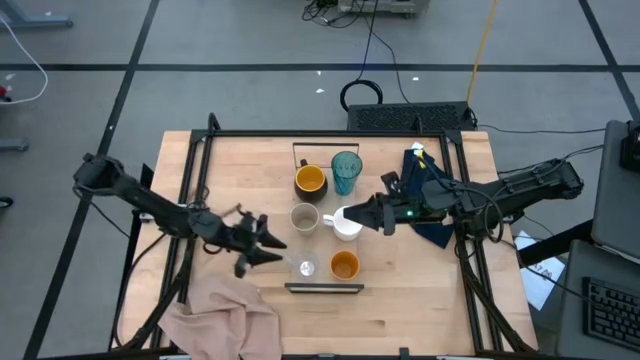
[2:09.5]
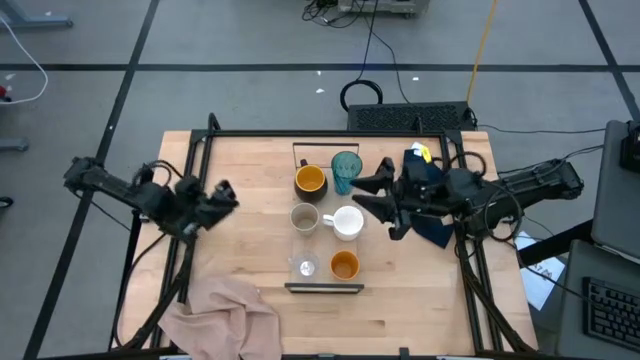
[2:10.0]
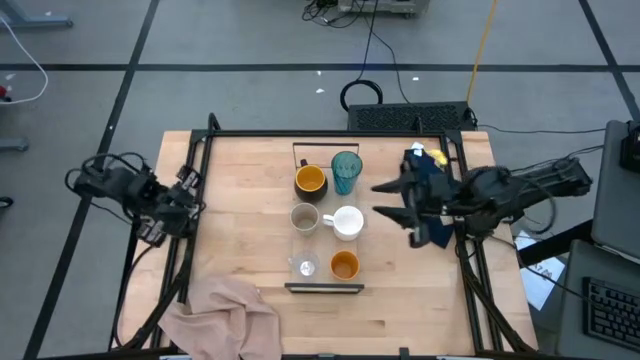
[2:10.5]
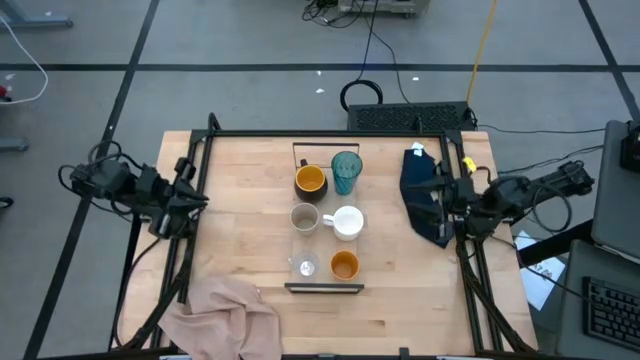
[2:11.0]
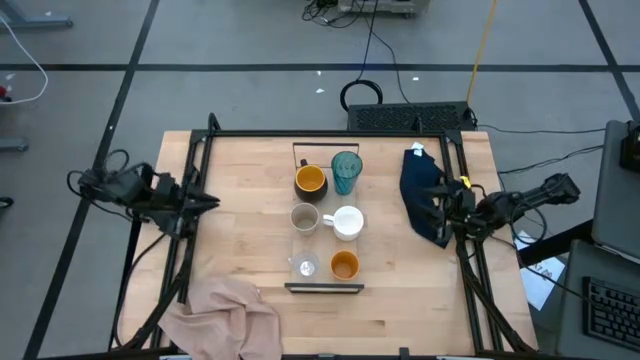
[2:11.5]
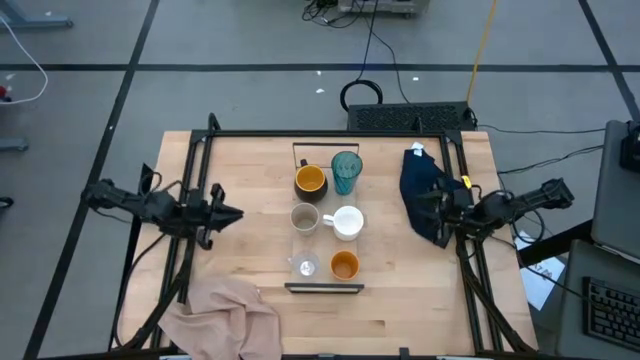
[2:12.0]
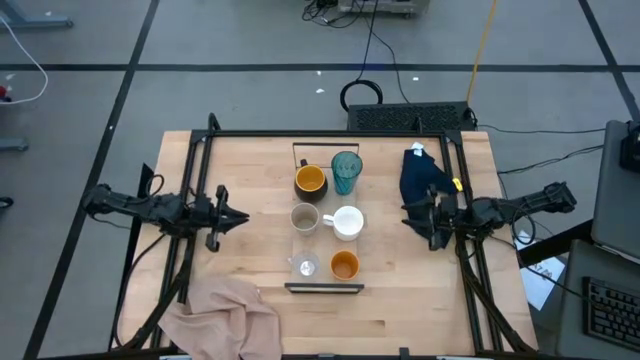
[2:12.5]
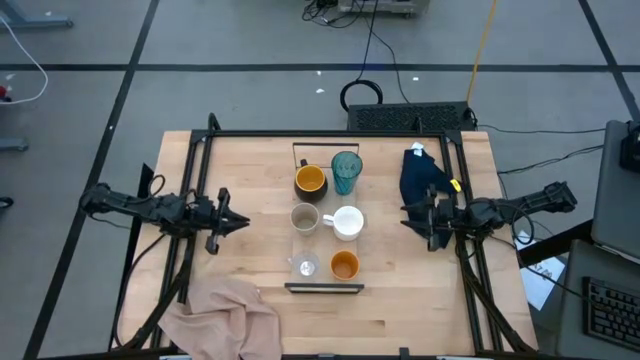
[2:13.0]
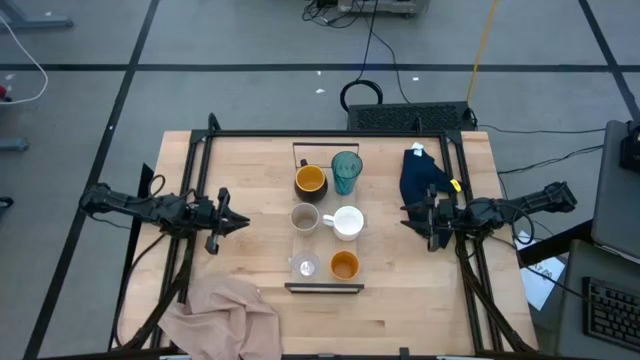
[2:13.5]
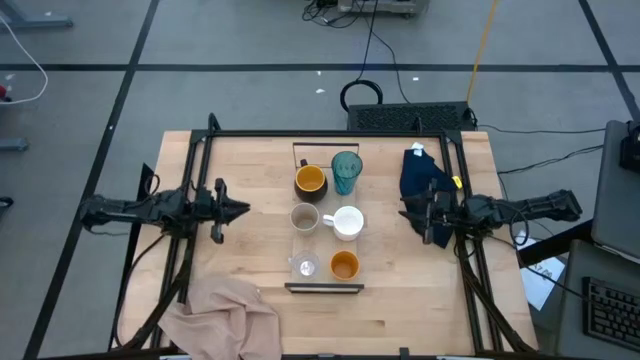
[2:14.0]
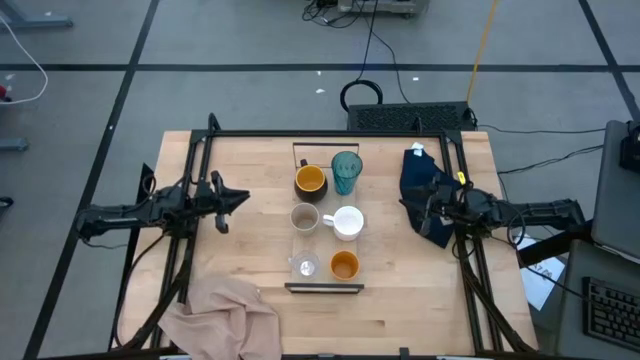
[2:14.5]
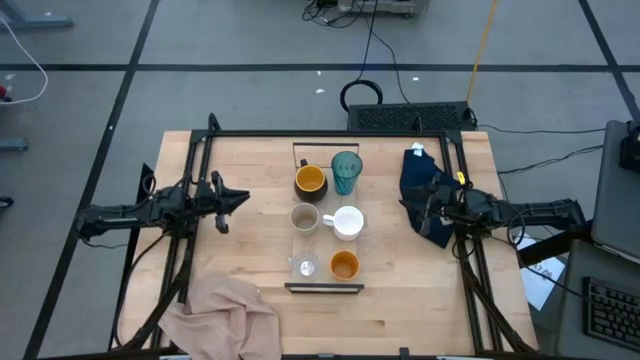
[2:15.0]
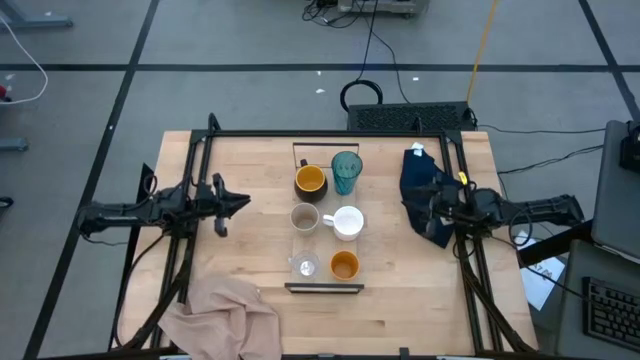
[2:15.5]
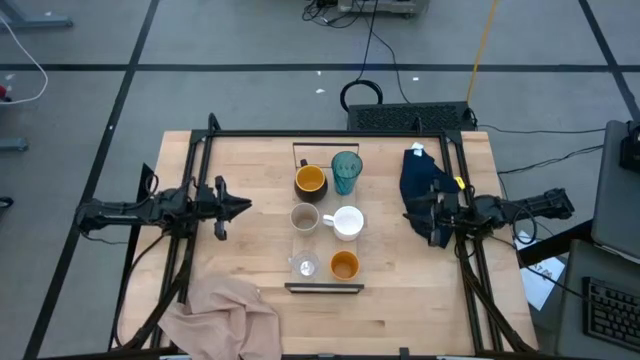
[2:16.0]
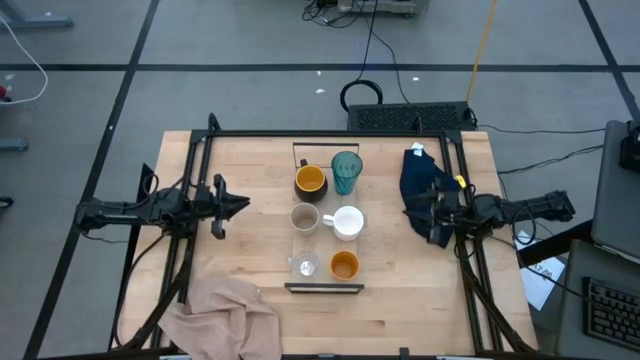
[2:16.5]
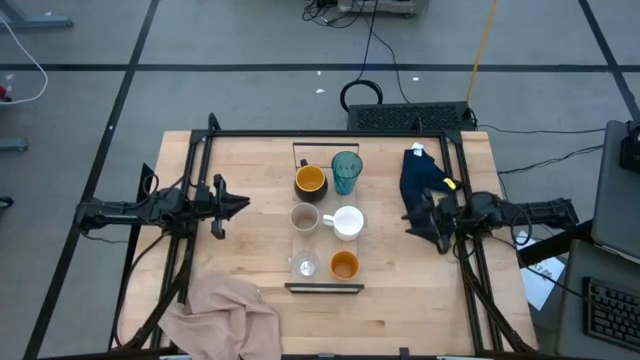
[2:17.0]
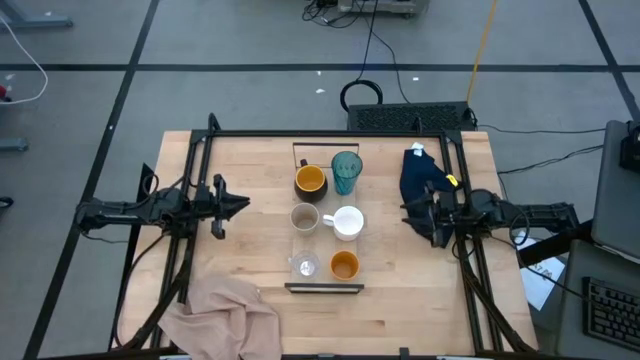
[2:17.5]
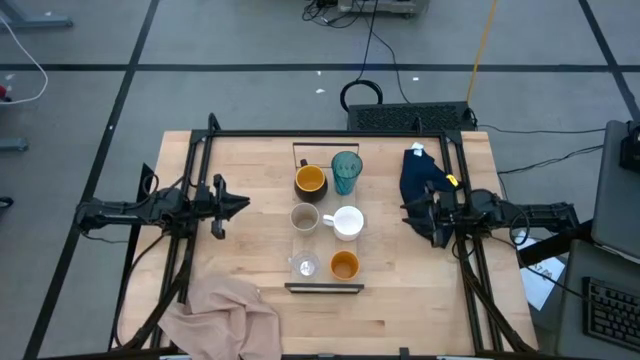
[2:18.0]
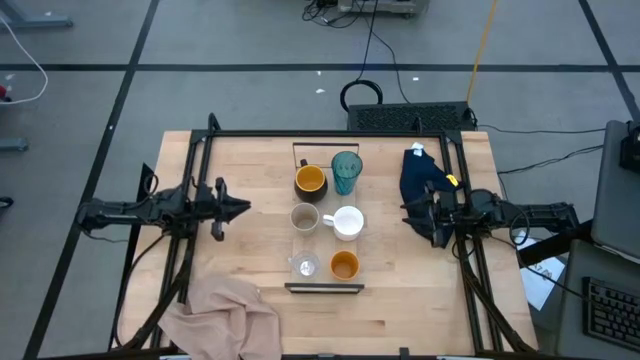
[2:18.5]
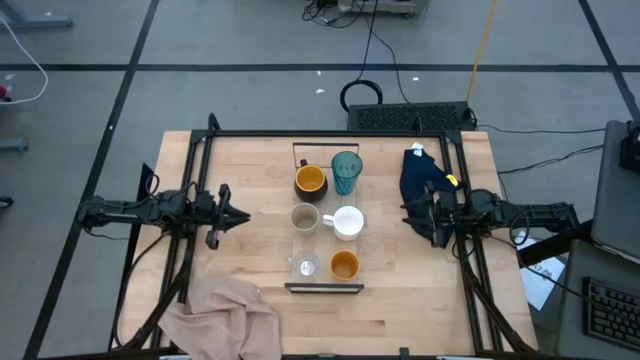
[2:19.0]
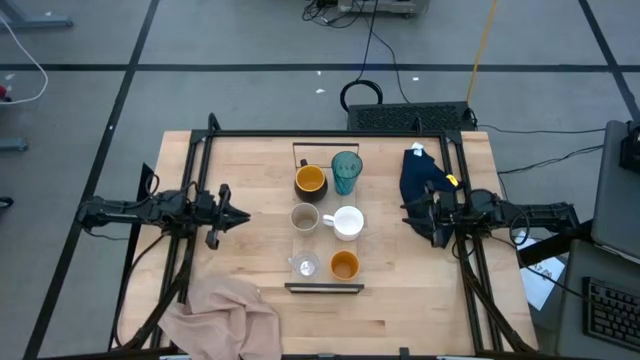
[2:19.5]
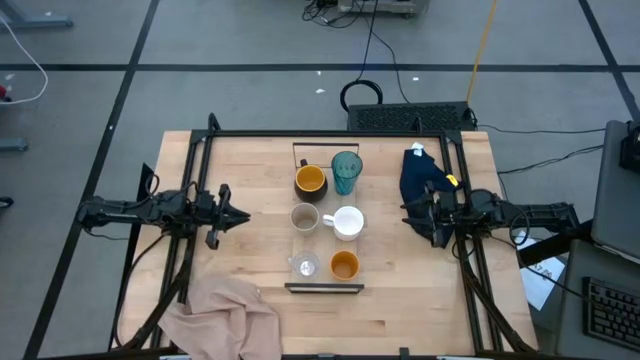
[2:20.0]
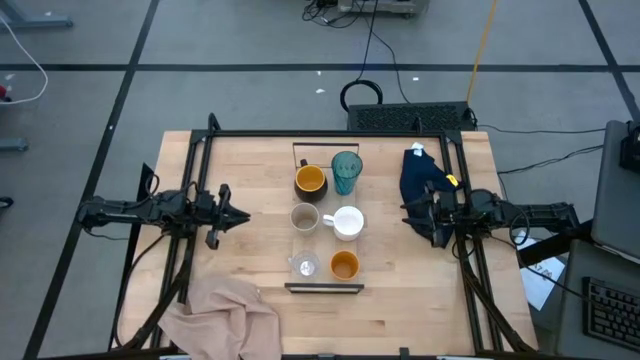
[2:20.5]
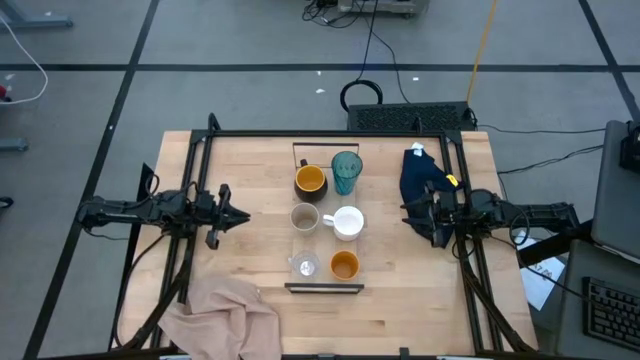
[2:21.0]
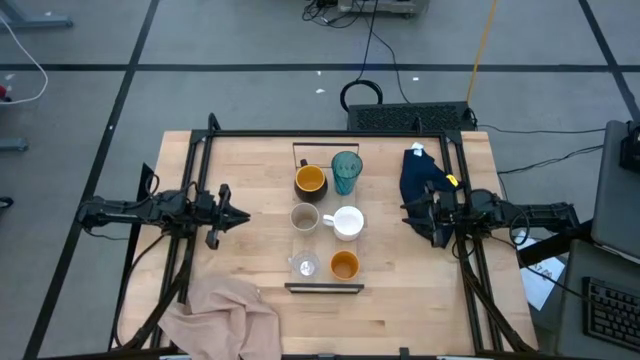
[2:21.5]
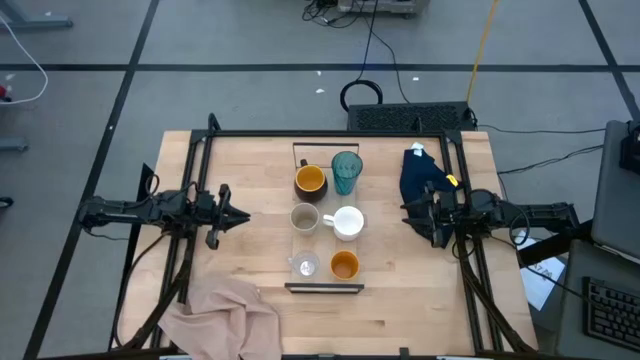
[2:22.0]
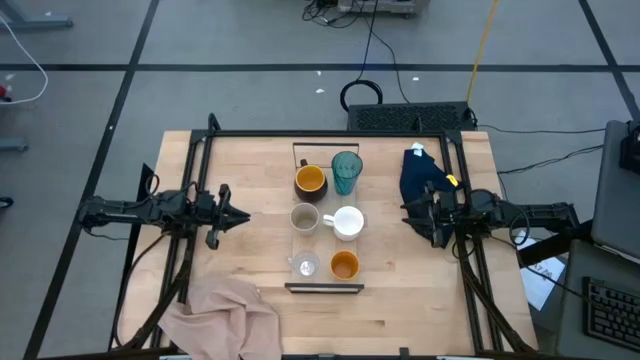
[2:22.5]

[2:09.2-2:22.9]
Task: Stack small to large cups/mugs on shelf
Return to Home Position

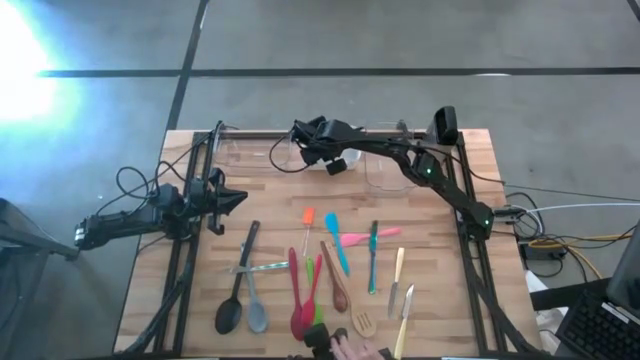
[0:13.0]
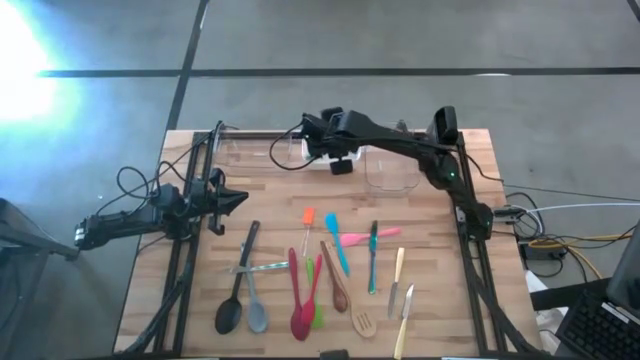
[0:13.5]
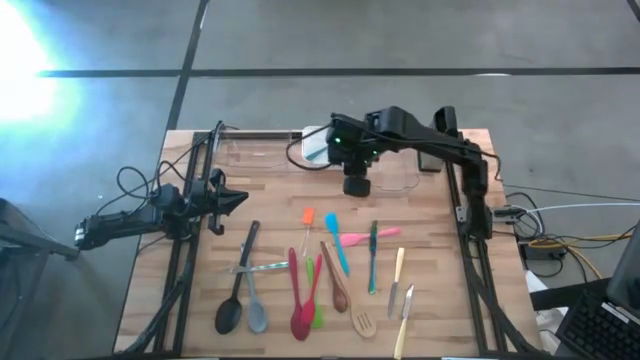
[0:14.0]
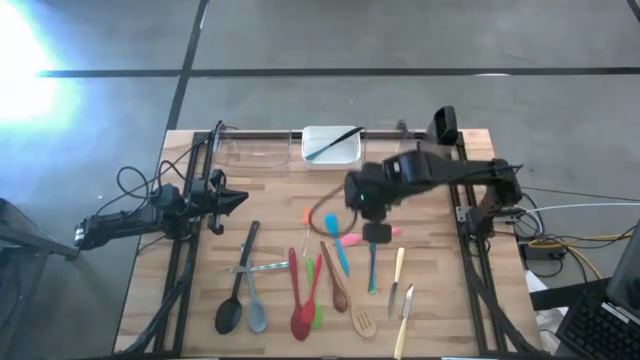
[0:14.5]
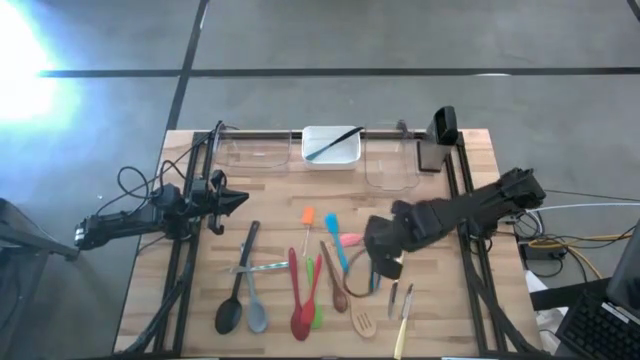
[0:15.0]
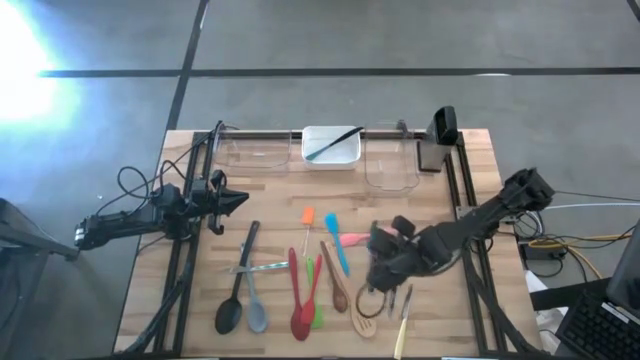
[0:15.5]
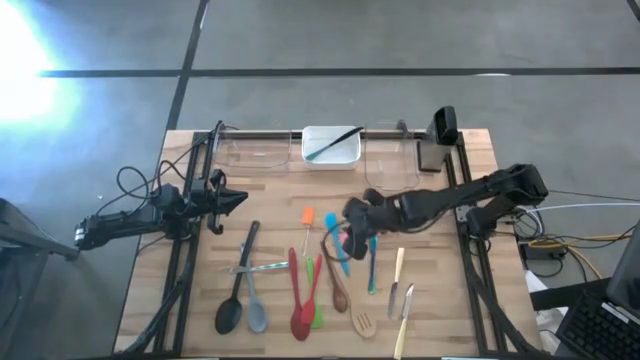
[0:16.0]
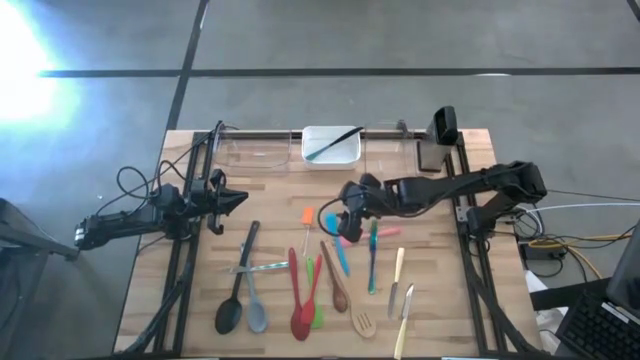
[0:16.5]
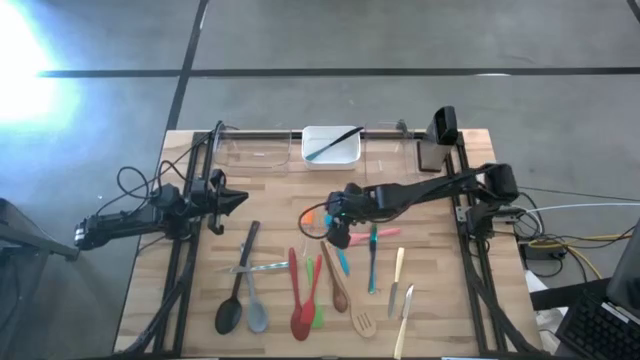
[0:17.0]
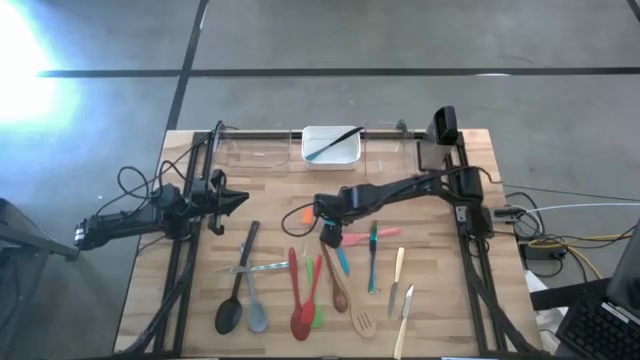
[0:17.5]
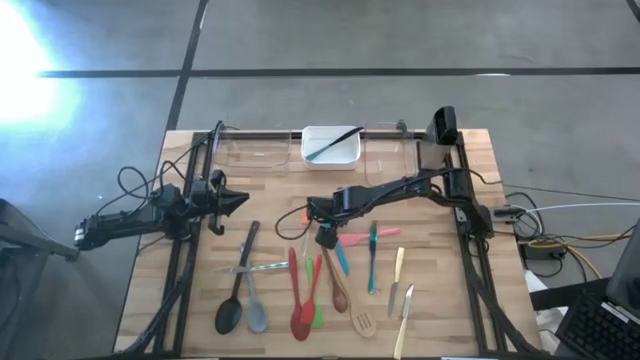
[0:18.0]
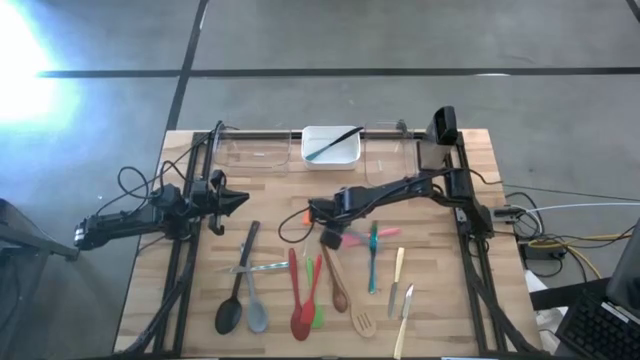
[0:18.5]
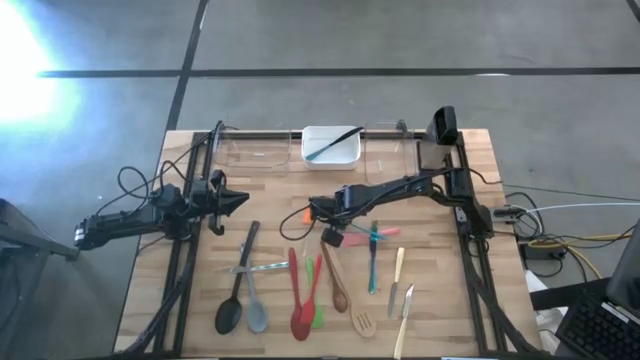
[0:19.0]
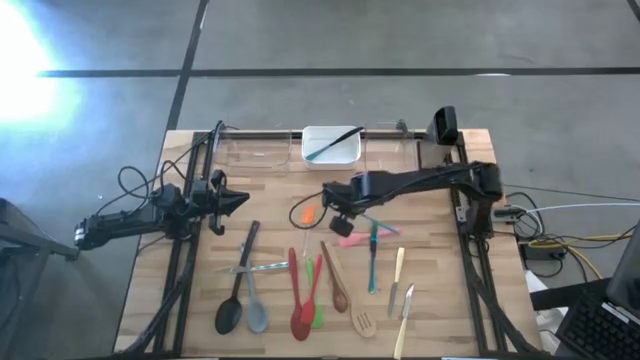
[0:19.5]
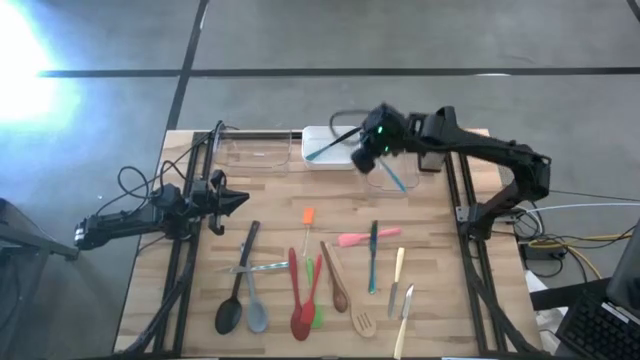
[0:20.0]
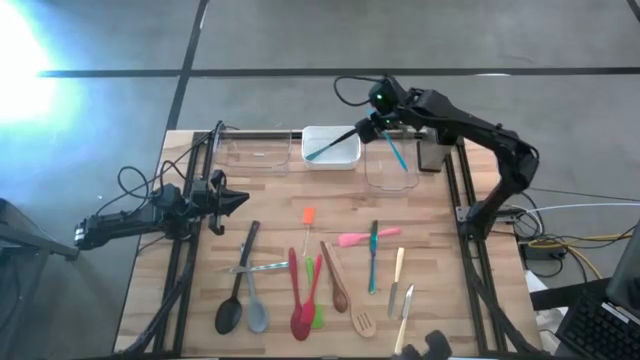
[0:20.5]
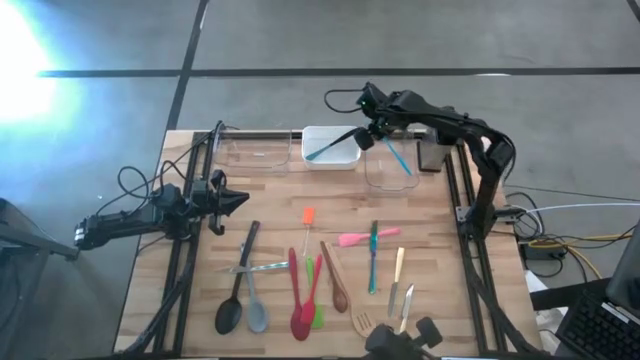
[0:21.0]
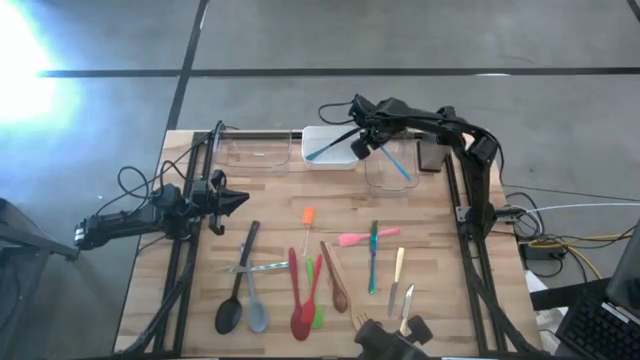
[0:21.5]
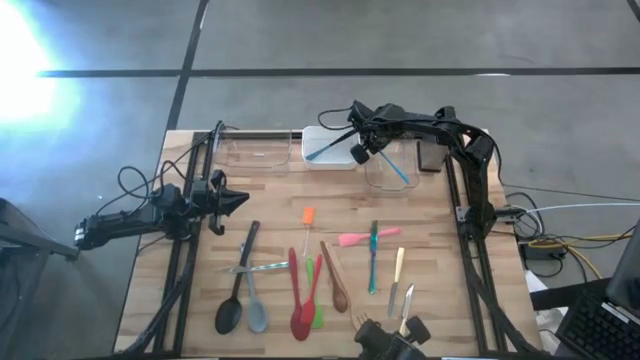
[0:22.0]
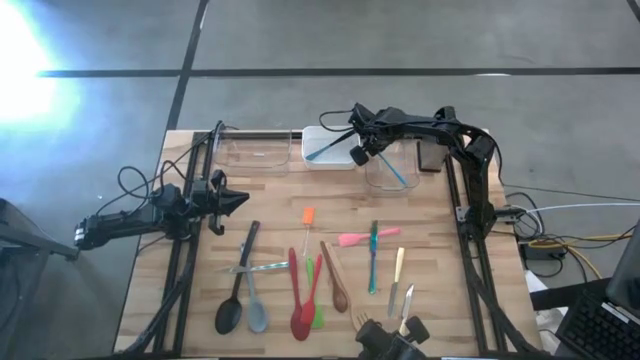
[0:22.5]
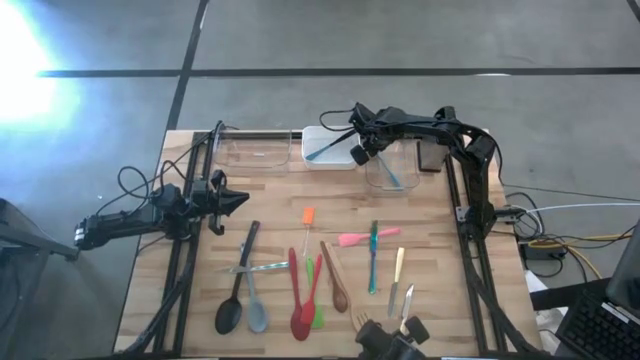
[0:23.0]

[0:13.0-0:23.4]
Task: Pick & Place Kitchen Items
Put the blue spatula into the right transparent bin
